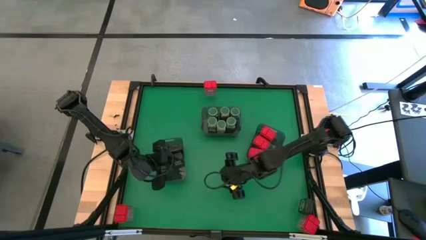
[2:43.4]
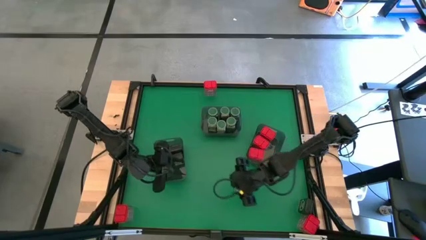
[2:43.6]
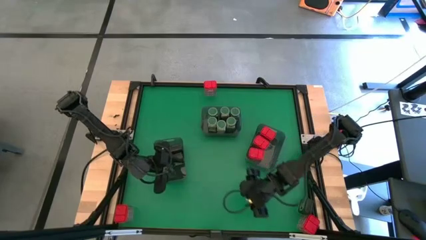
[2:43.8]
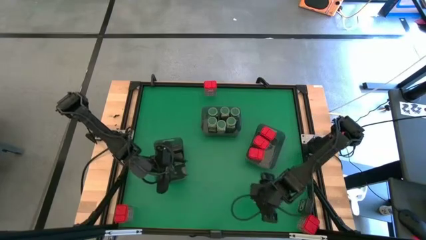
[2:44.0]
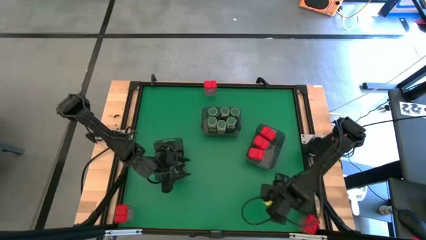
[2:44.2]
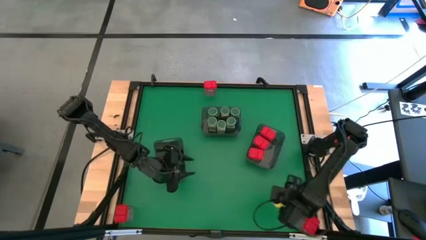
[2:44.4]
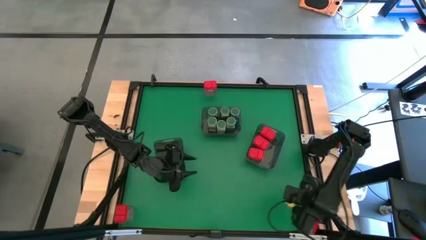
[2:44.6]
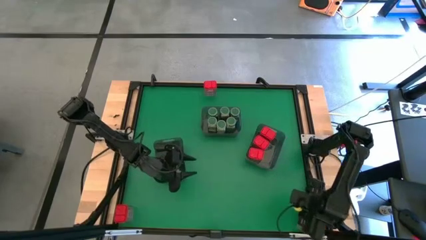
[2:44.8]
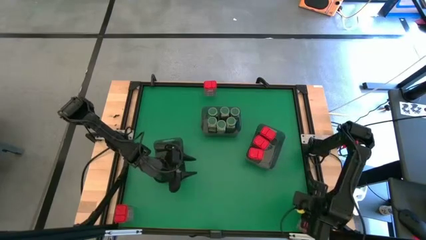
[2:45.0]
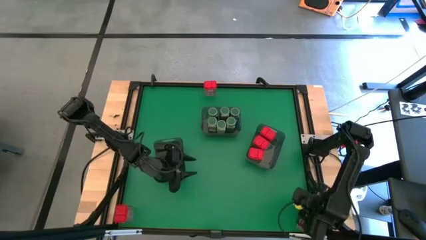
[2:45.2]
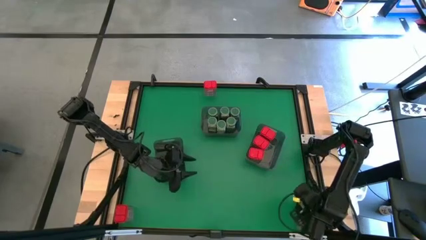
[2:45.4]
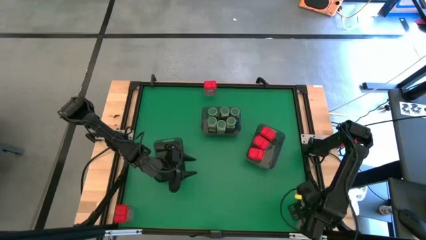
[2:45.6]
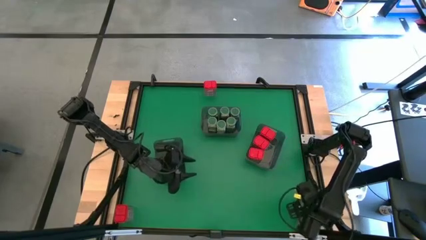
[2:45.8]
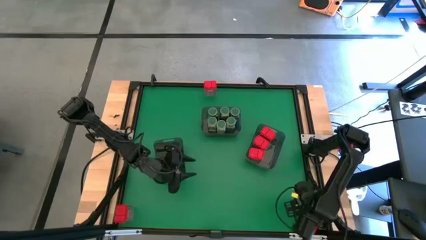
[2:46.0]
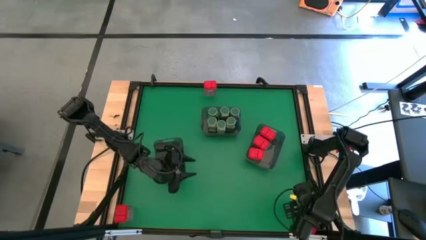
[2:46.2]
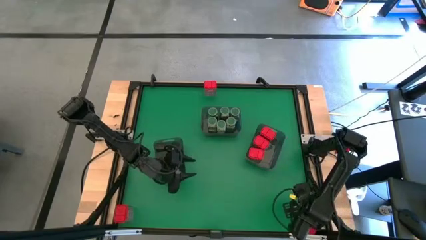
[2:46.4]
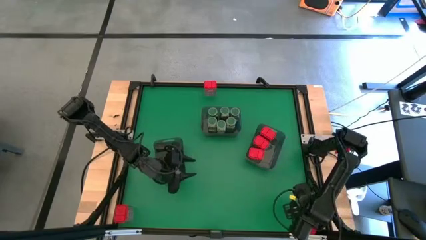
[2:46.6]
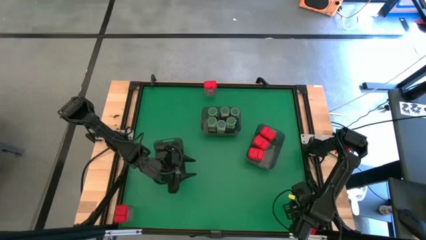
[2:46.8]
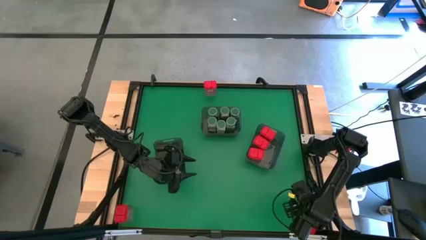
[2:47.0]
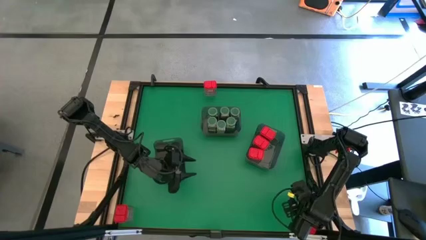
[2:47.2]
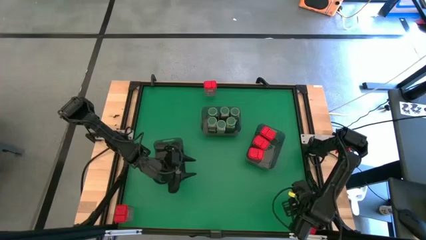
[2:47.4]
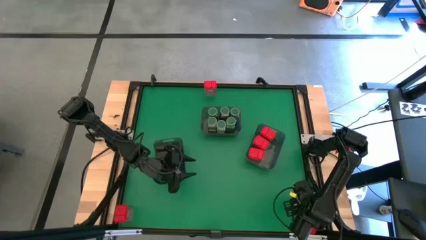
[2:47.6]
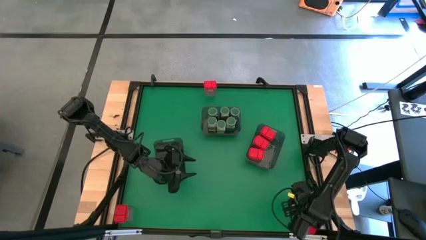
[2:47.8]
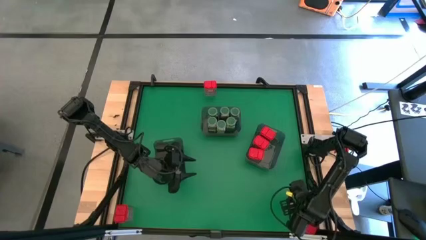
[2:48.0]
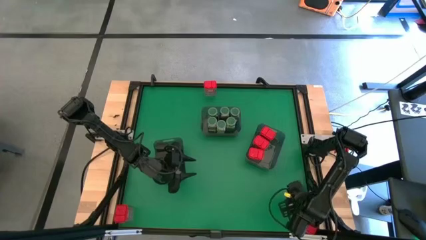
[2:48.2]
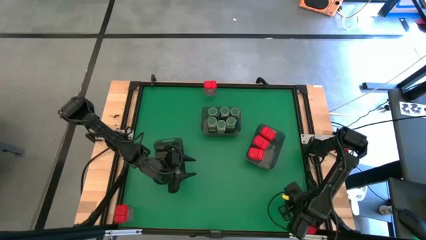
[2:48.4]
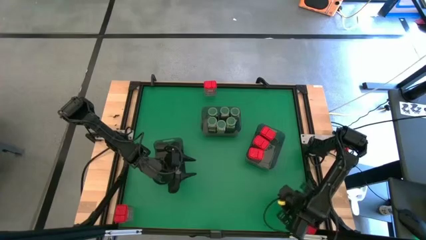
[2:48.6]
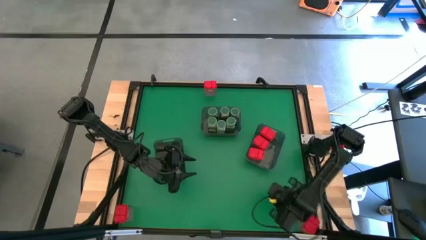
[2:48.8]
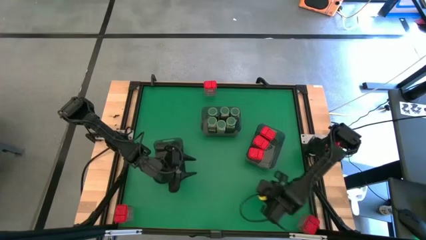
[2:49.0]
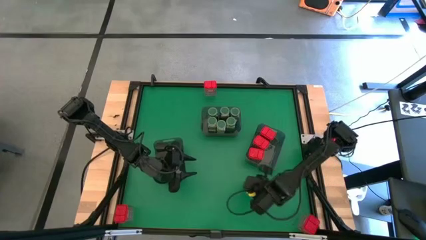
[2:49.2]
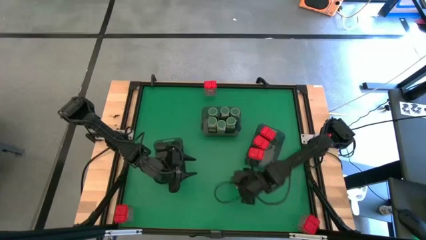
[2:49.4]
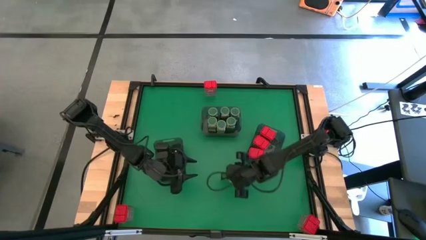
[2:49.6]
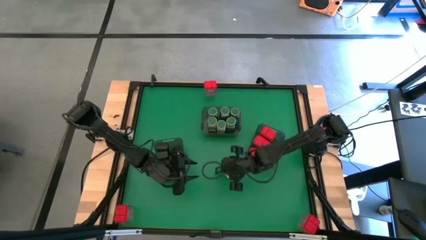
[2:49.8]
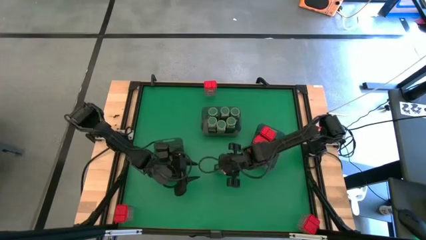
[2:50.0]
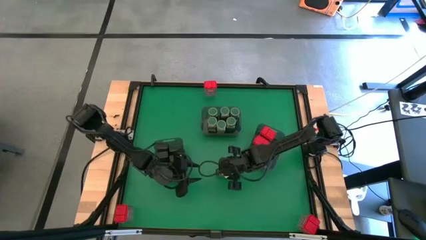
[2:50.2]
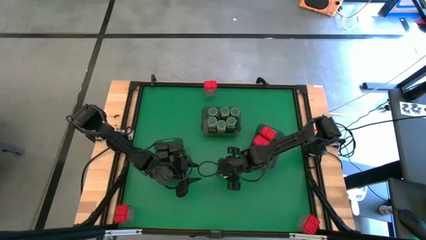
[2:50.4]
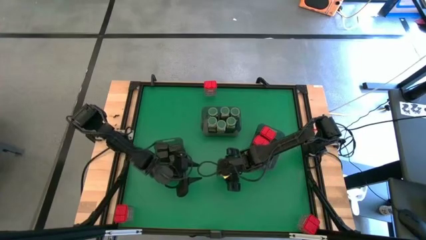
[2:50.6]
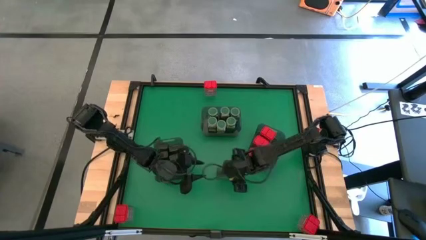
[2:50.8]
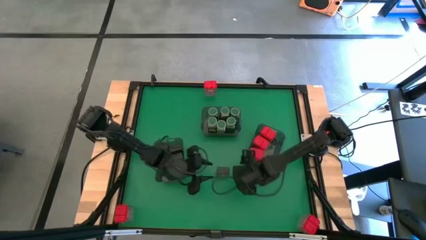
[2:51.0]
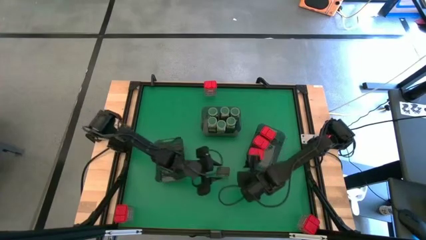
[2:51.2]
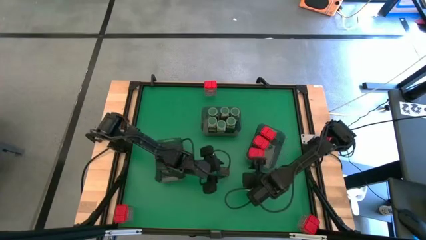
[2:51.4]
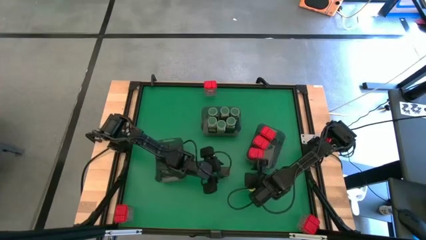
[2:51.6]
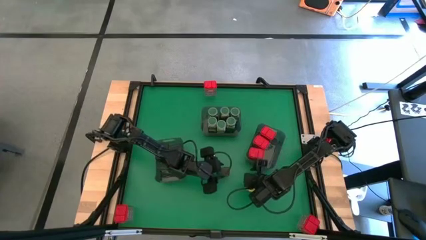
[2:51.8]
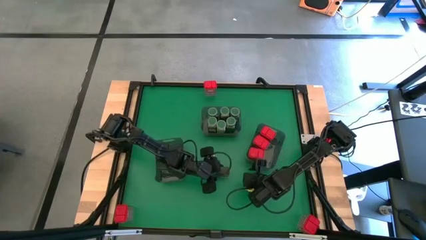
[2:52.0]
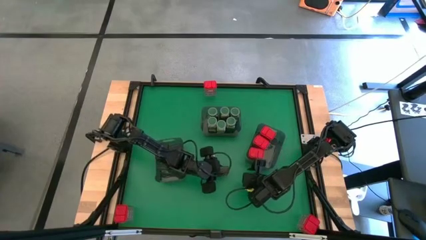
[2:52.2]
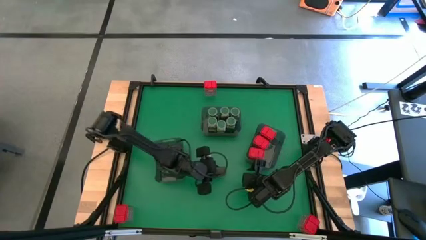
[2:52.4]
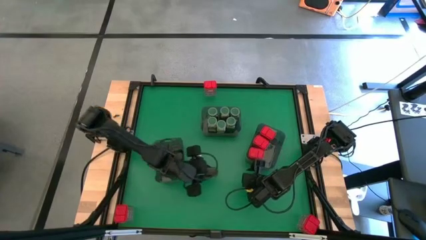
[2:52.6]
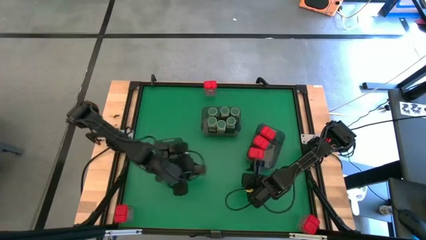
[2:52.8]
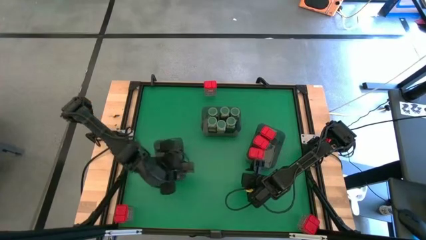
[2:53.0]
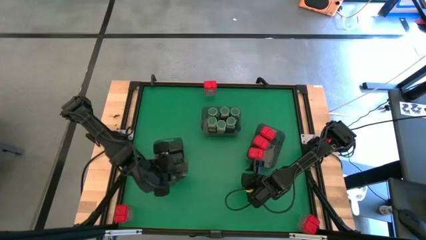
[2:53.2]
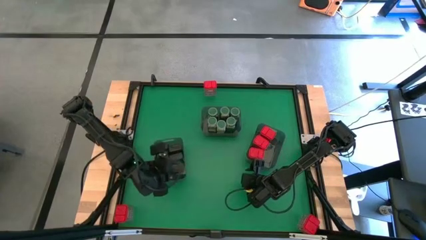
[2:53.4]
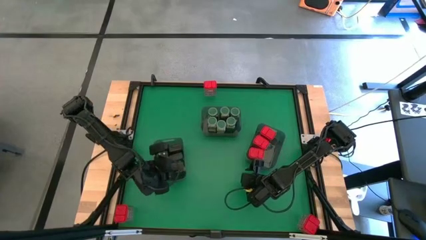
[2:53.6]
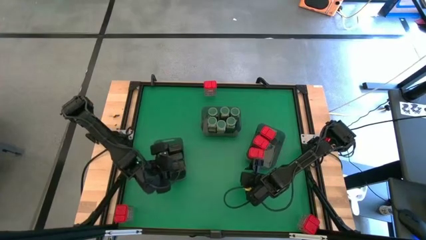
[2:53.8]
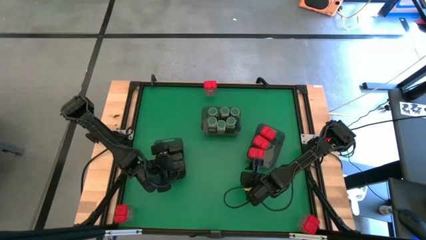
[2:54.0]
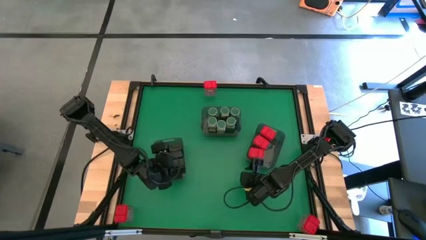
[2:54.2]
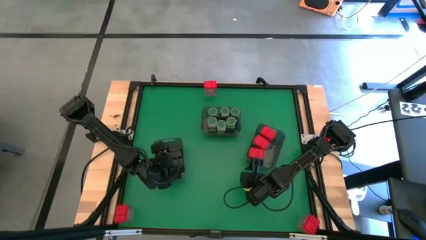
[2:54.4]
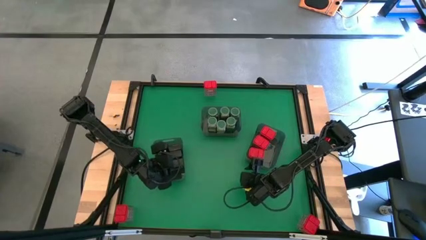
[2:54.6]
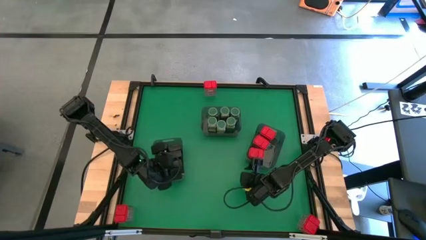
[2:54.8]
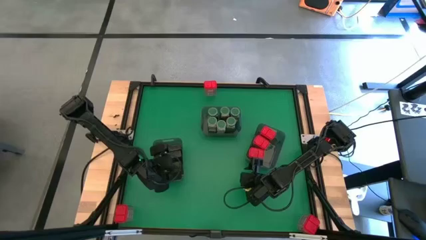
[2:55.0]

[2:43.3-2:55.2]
Task: Sort spices by type
Put the black seasoning can into the left black bin

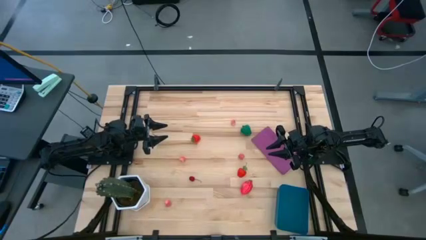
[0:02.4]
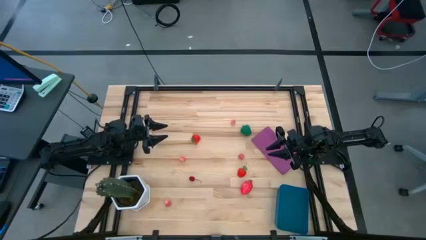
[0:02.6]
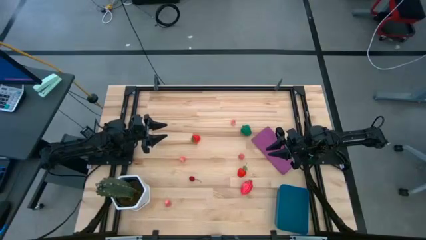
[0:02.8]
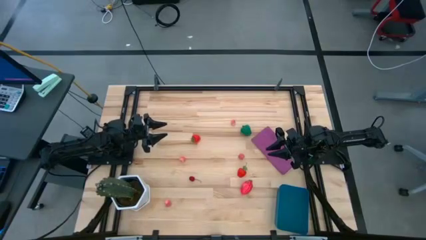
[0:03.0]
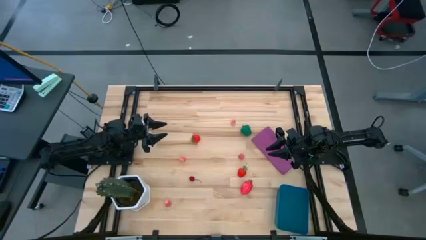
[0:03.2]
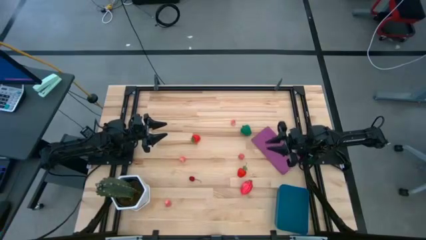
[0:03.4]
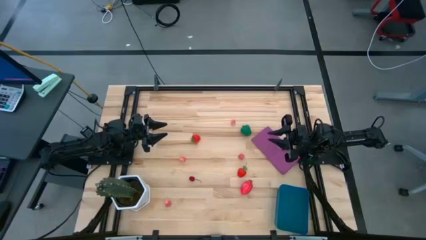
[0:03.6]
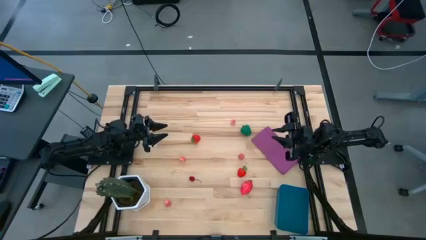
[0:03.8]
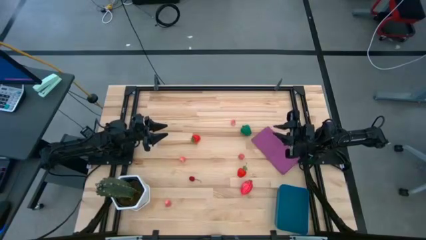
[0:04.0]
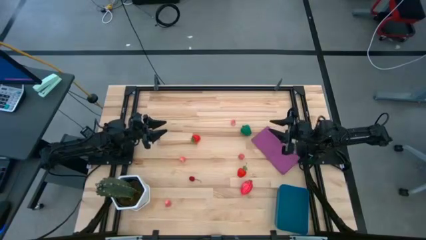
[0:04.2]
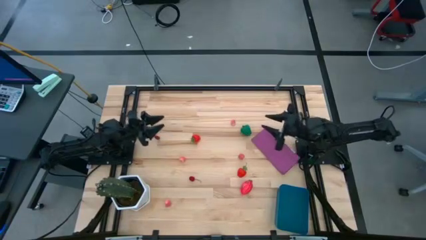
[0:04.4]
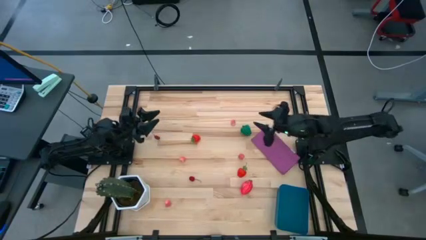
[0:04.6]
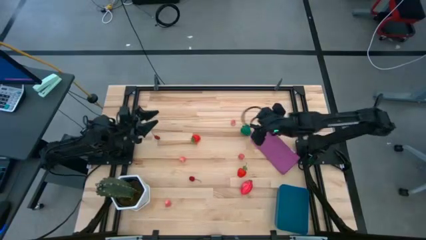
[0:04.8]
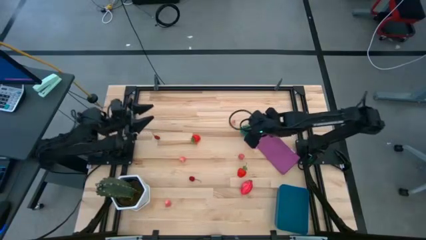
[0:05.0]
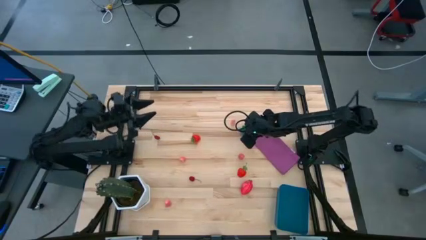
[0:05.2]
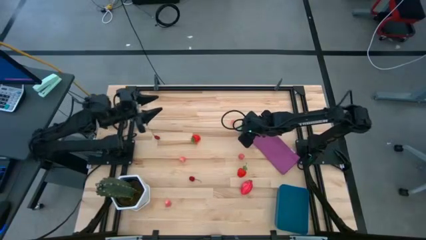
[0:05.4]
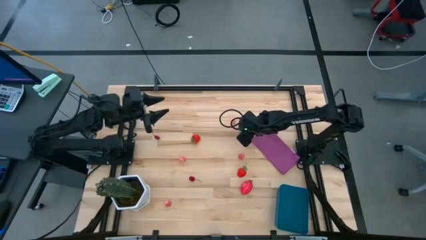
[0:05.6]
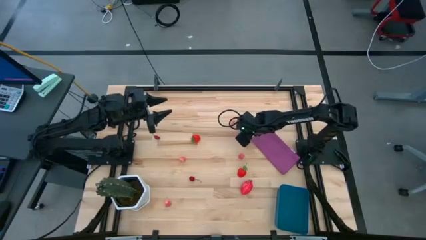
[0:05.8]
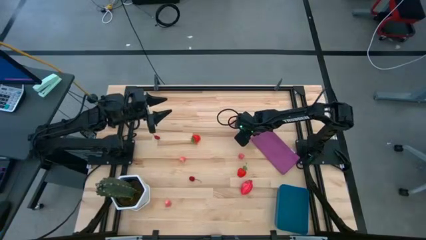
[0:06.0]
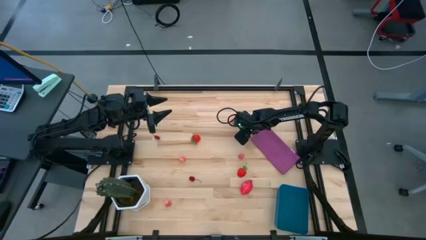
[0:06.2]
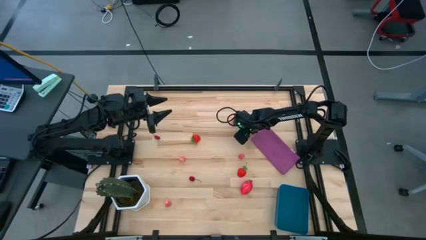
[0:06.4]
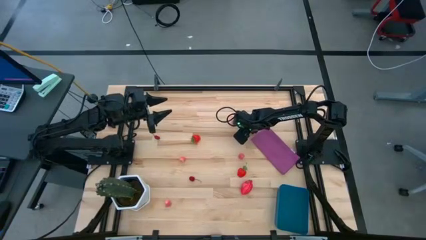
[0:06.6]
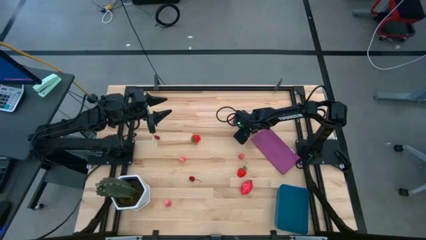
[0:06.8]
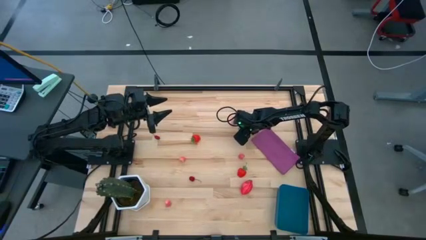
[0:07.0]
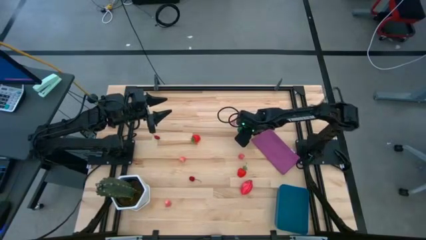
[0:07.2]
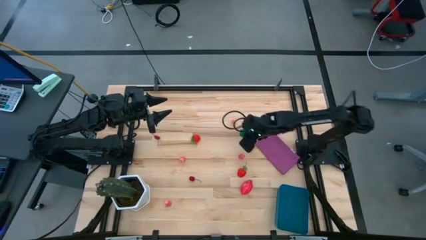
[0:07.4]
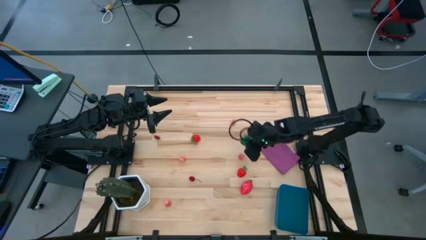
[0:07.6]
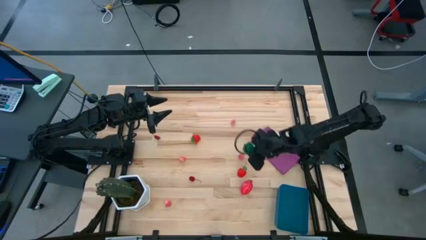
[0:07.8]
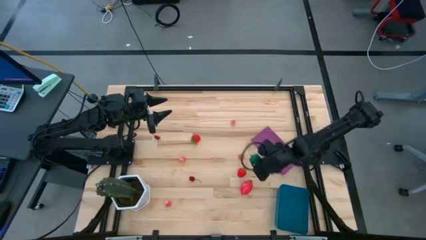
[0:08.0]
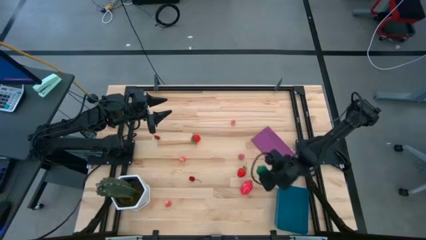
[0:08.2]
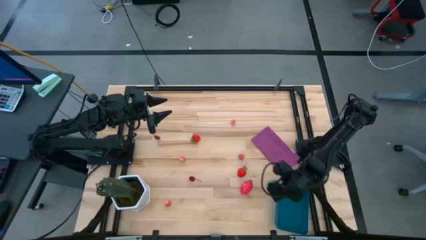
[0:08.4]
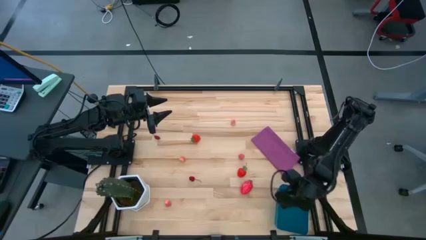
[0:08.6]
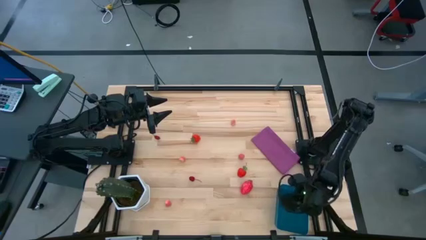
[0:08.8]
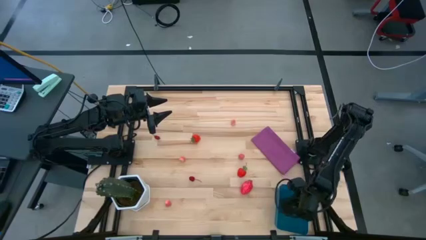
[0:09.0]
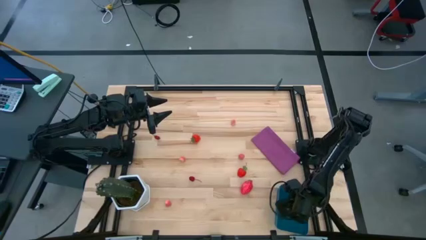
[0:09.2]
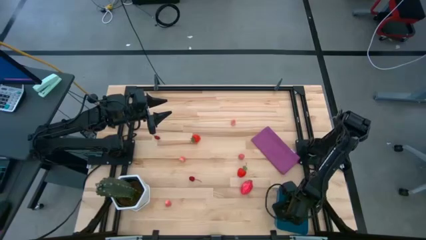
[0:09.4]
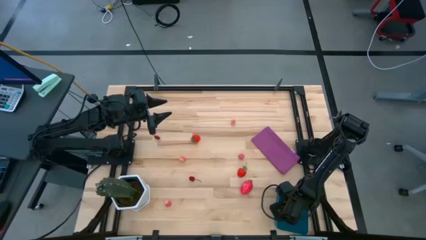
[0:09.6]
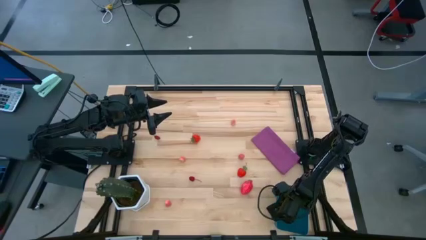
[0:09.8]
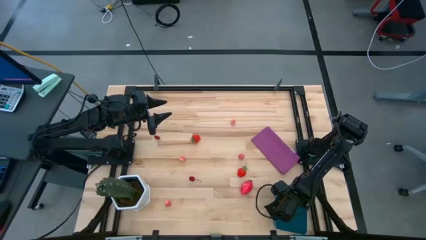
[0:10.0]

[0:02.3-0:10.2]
Task: Pick and placing Produce into tupperware
Put the green bell pepper into the blue bin
